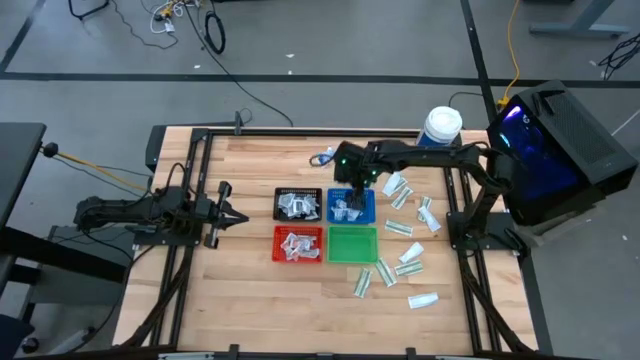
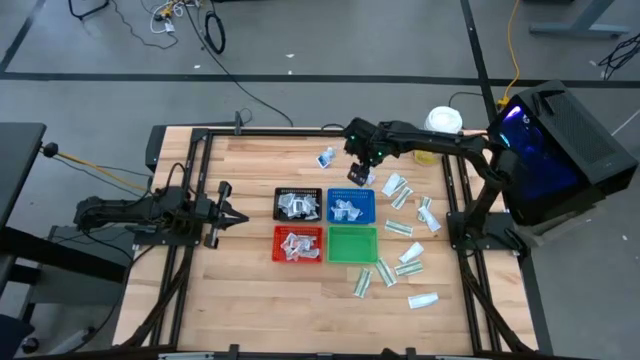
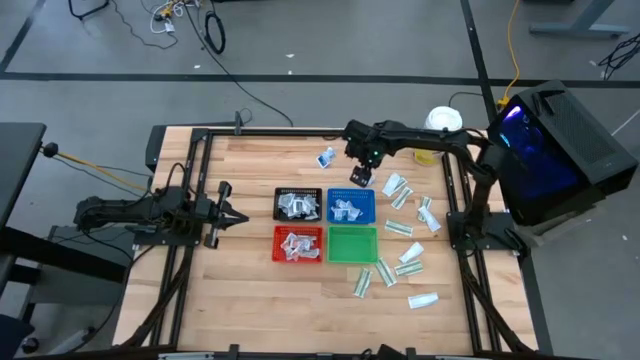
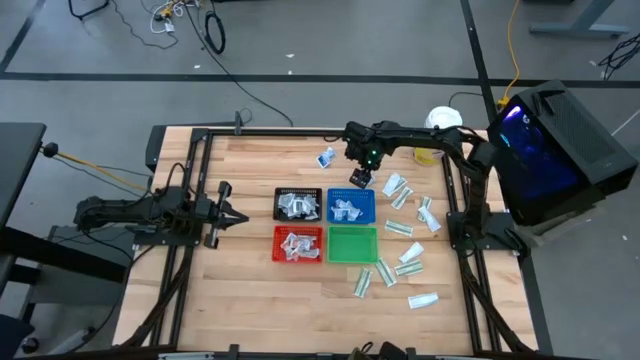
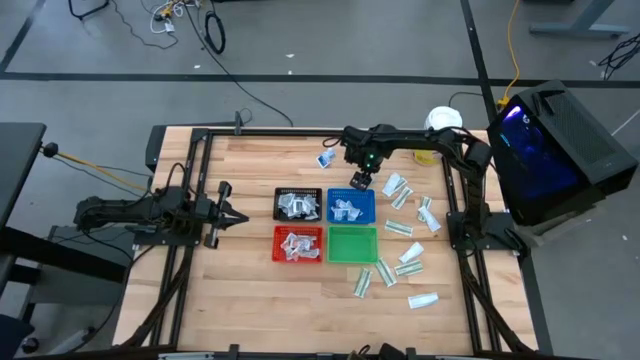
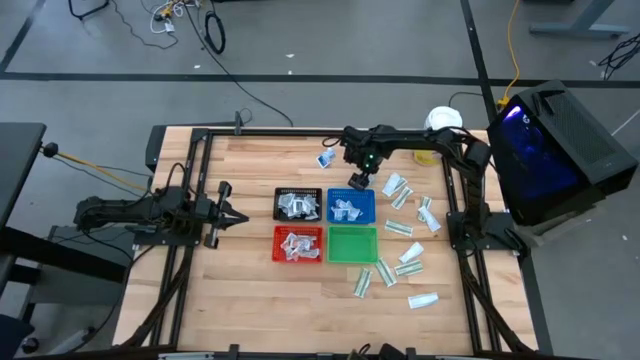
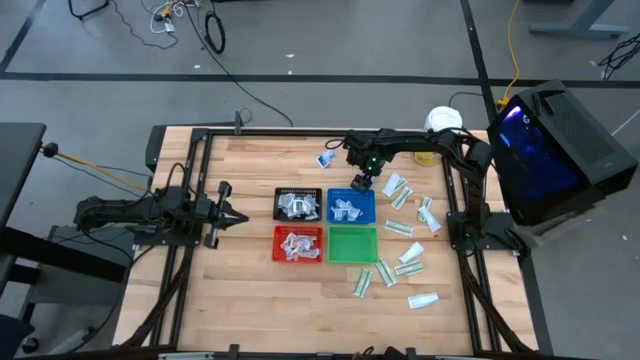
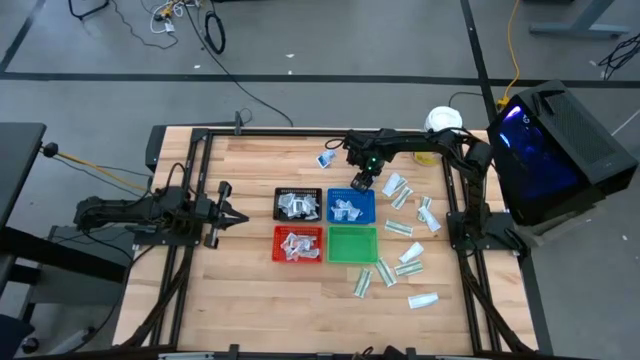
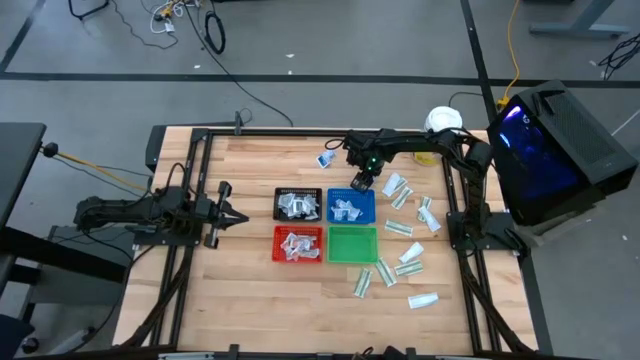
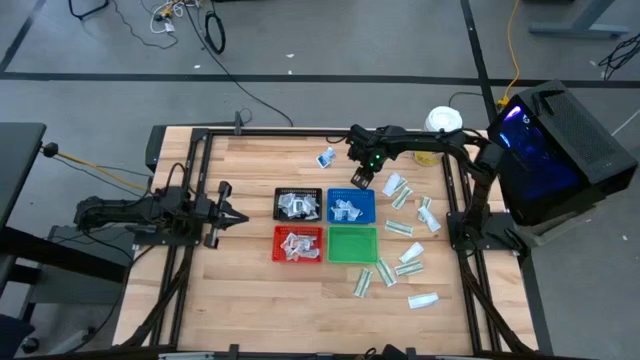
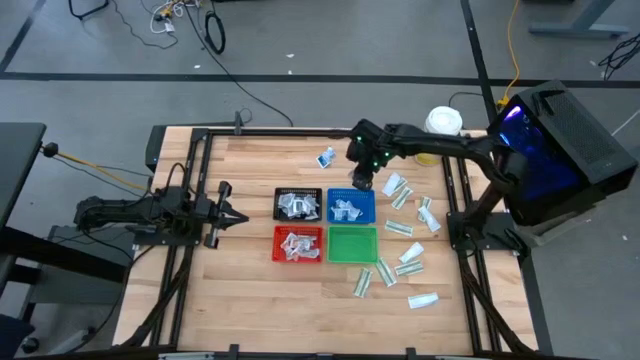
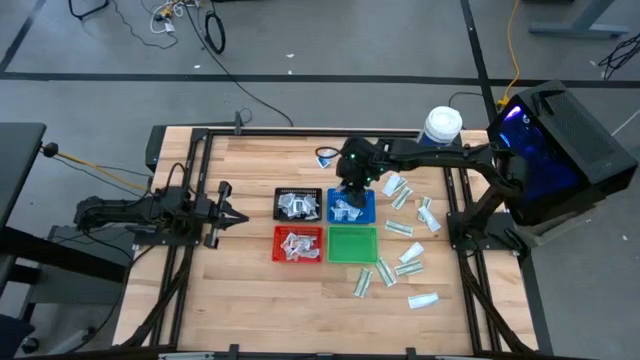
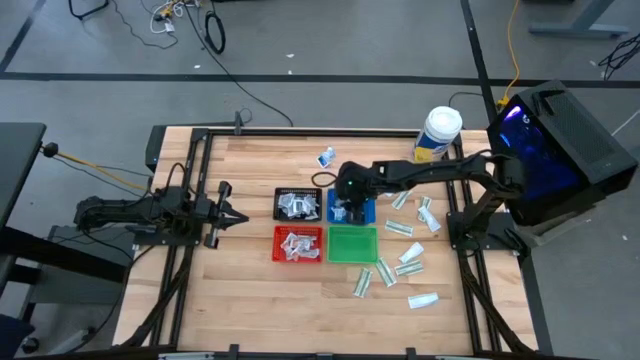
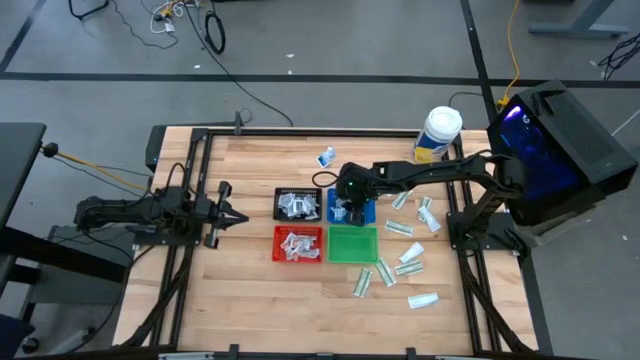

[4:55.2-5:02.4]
Task: Pick & Place First Aid Supplies
Put the blue alcohol pad into the blue bin

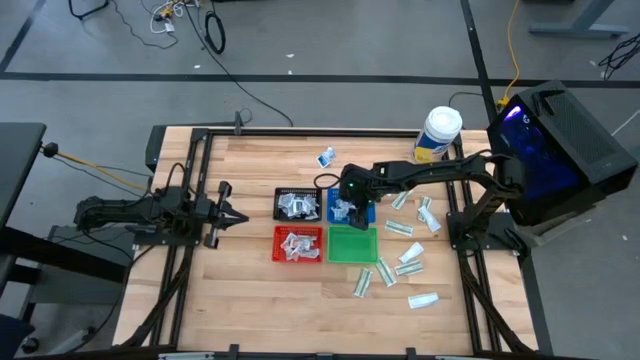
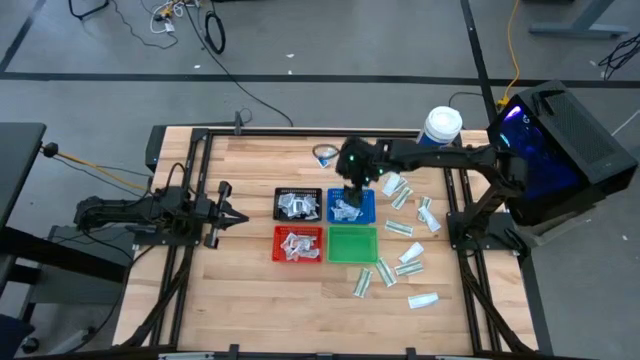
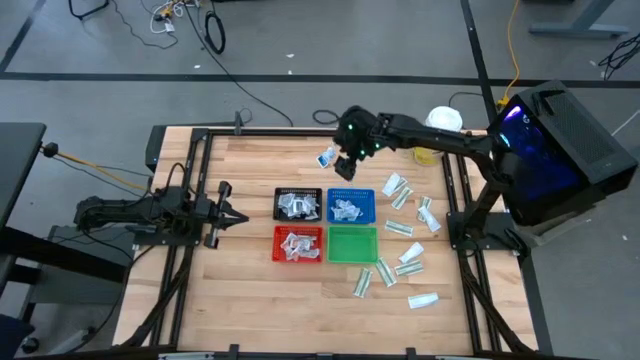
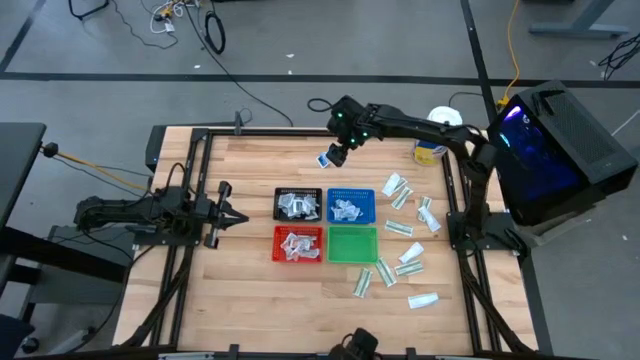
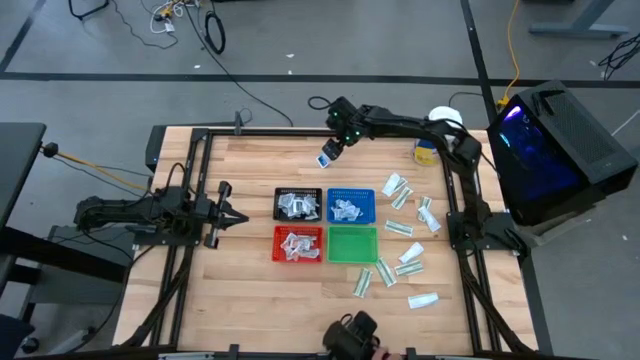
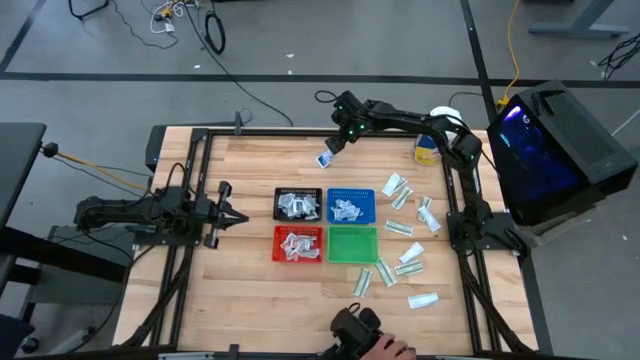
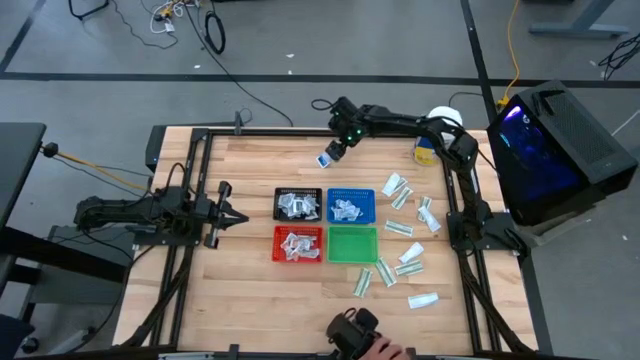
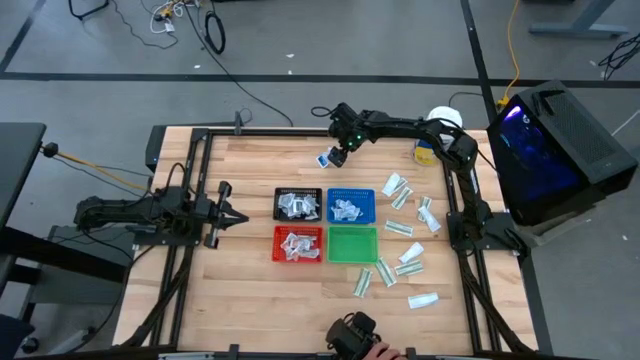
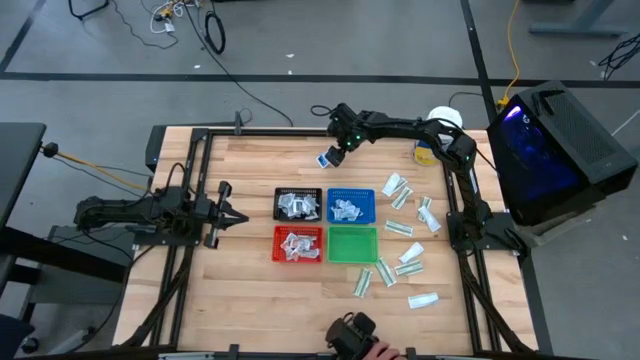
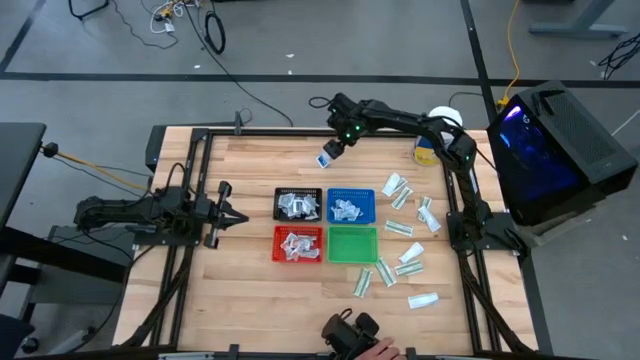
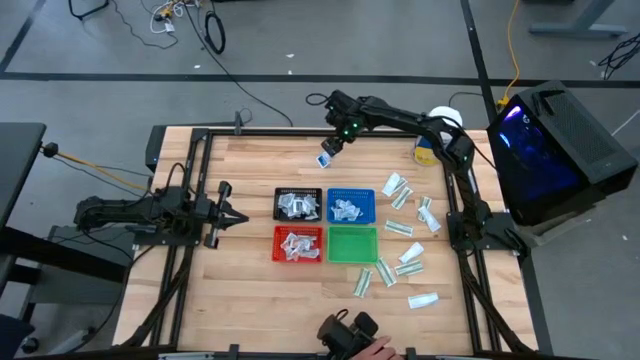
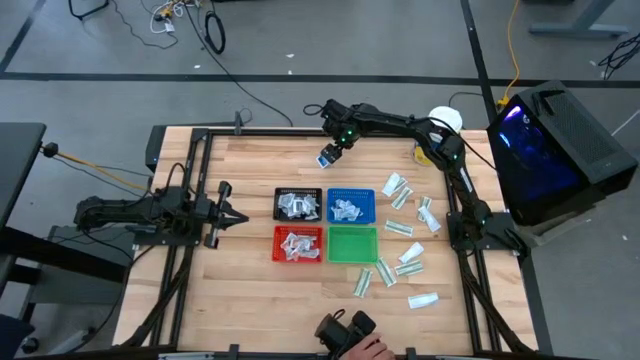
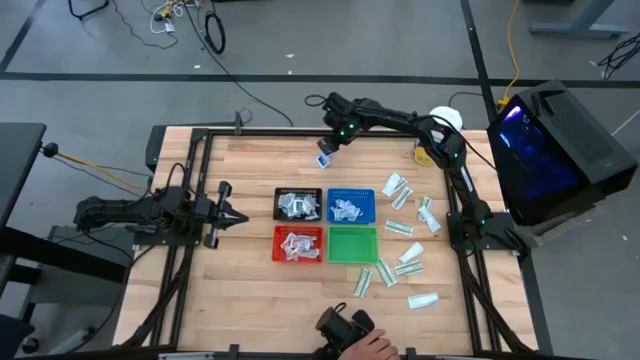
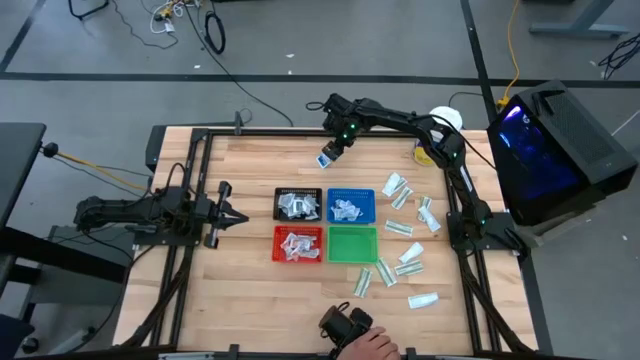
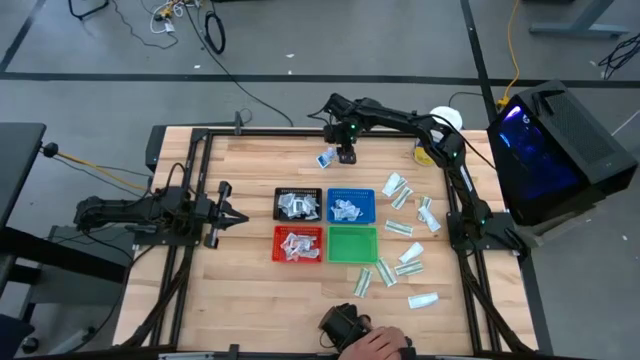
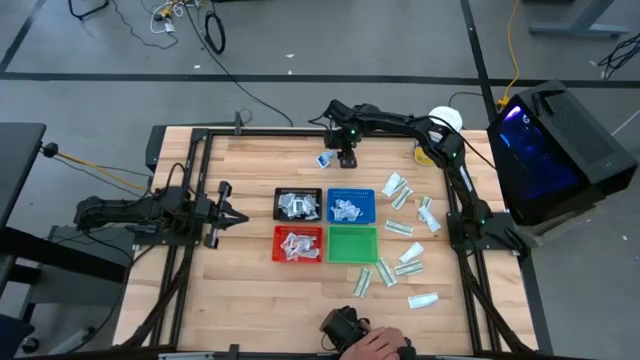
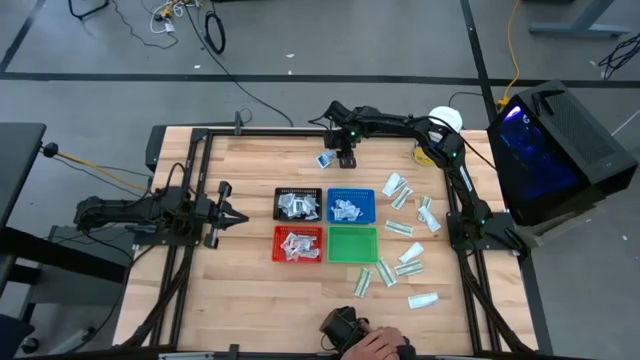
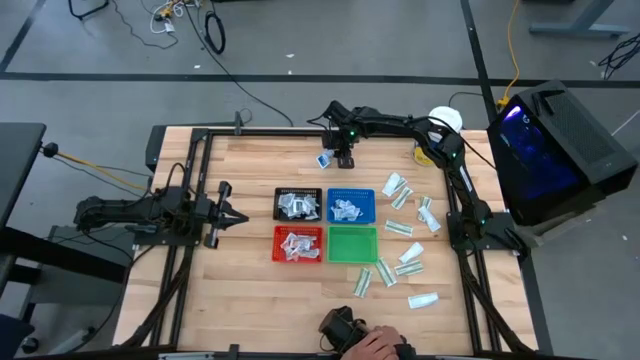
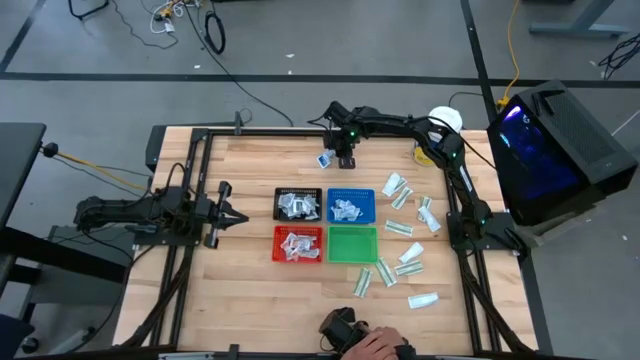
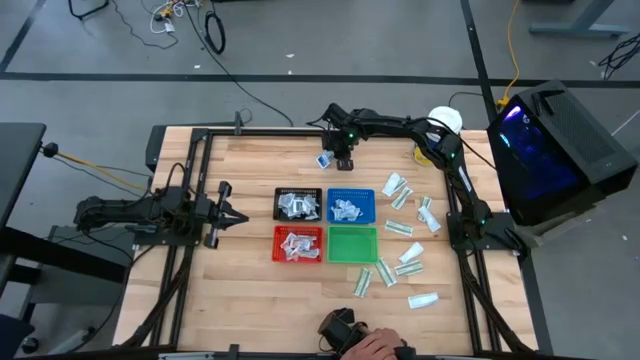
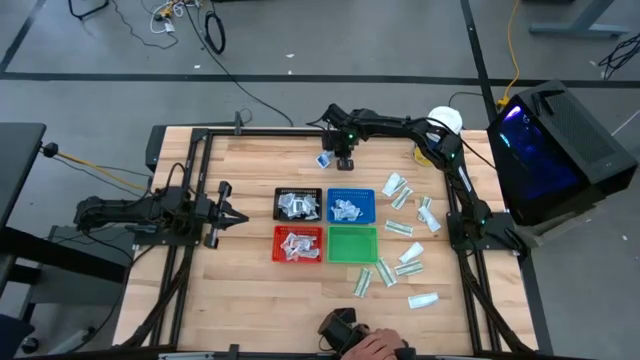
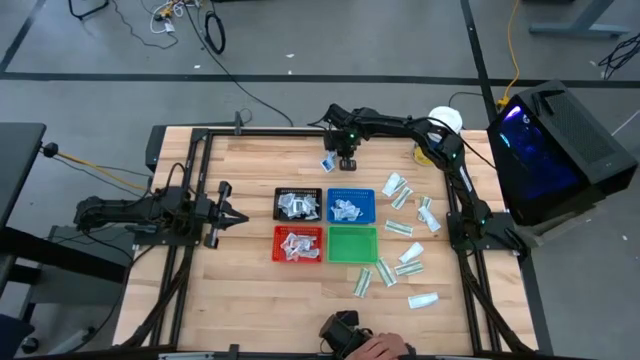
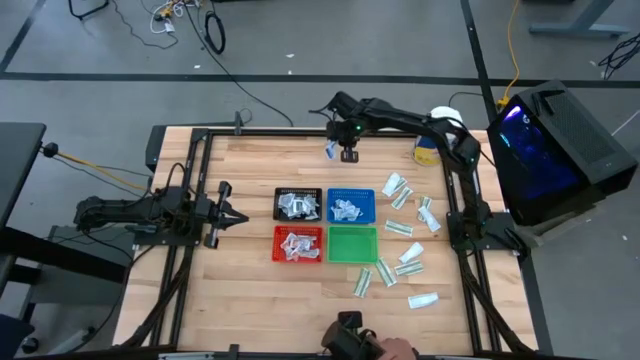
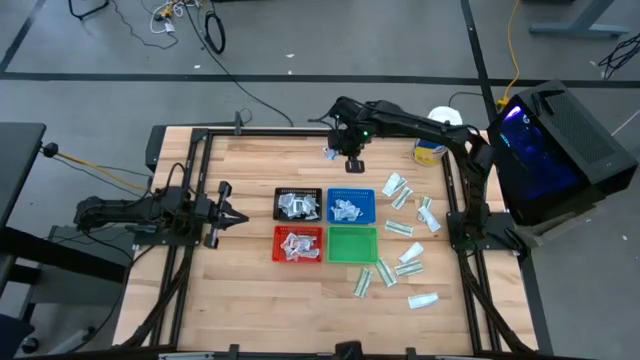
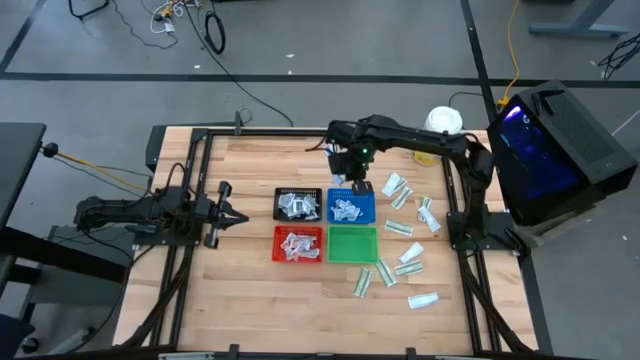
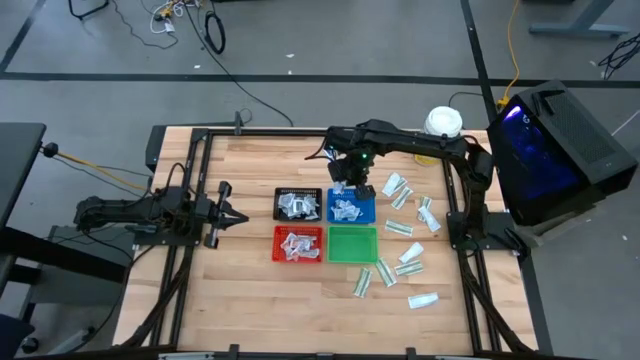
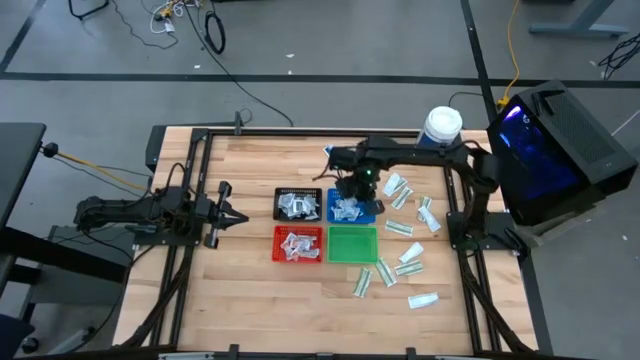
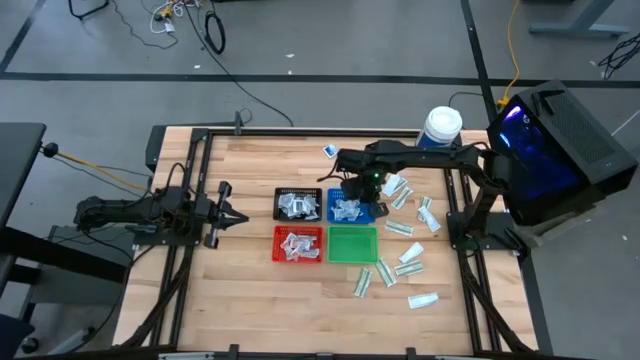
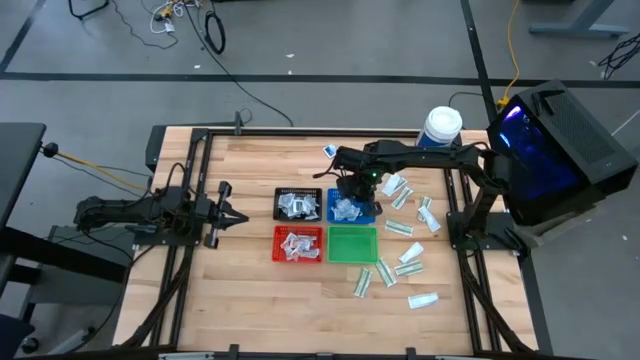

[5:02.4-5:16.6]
Put the blue alcohol pad into the blue bin

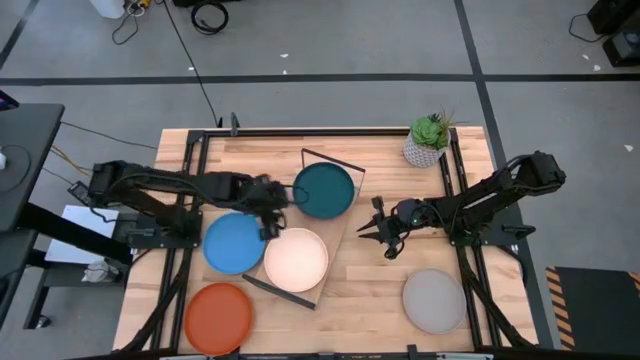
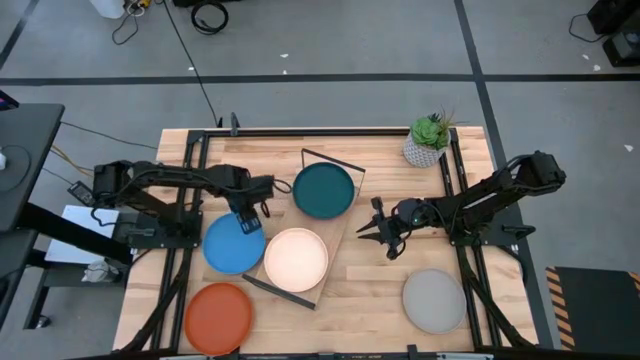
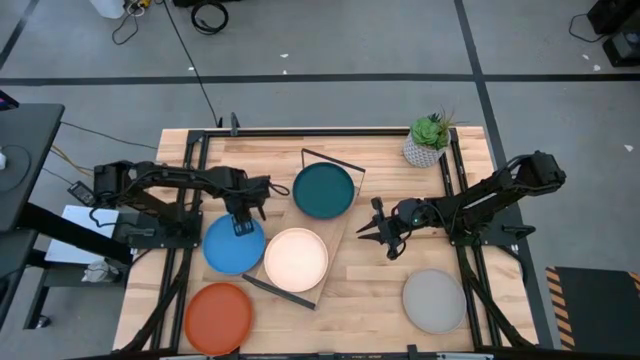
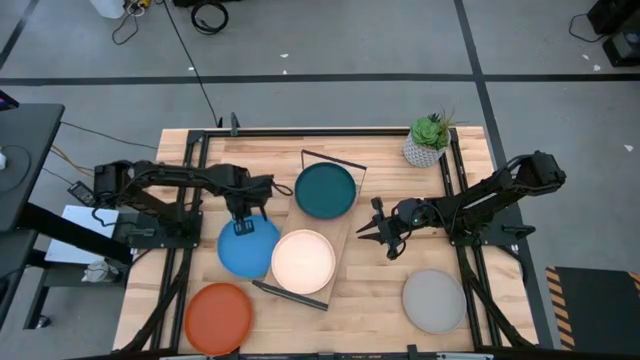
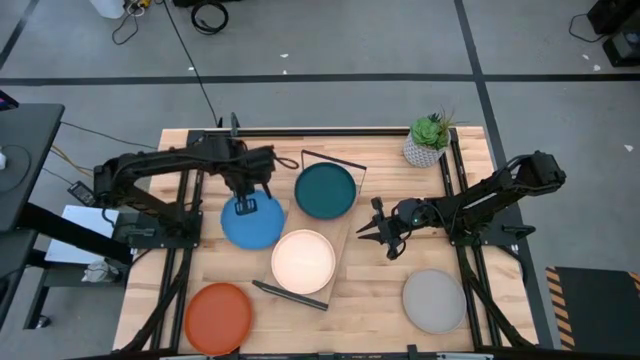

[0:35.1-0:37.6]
Task: Place and stack plates onto a shelf
Stack the blue plate on top of the green plate on the shelf
